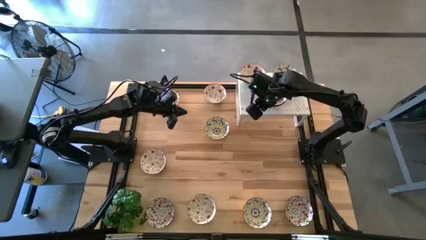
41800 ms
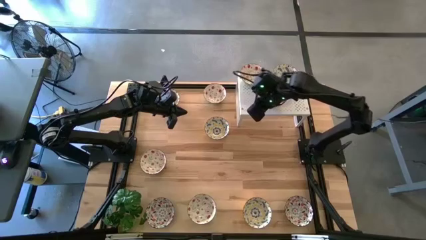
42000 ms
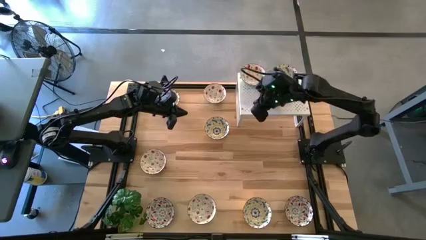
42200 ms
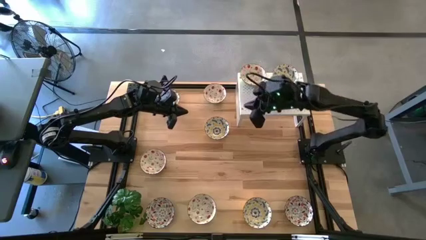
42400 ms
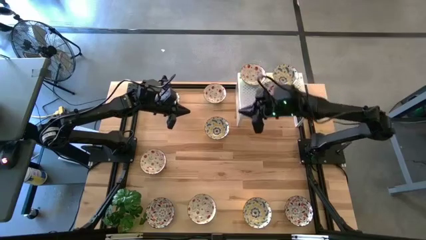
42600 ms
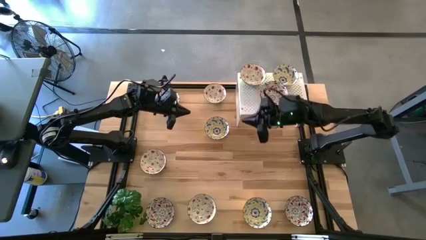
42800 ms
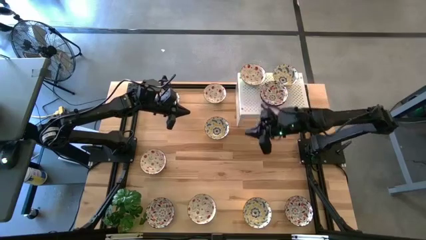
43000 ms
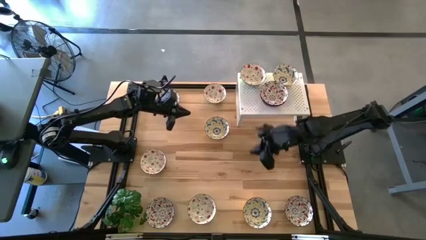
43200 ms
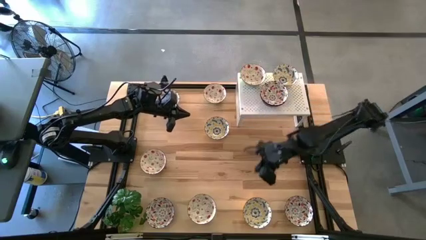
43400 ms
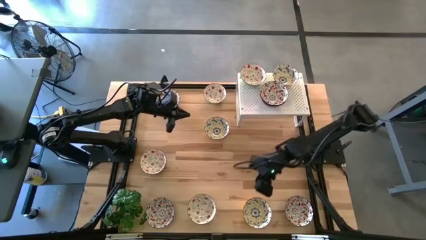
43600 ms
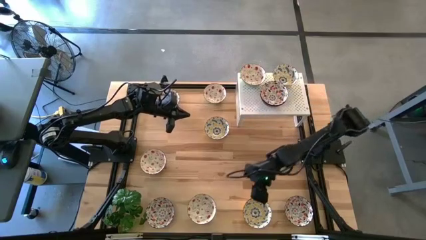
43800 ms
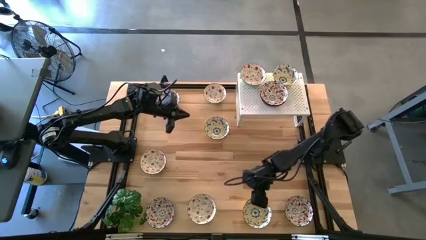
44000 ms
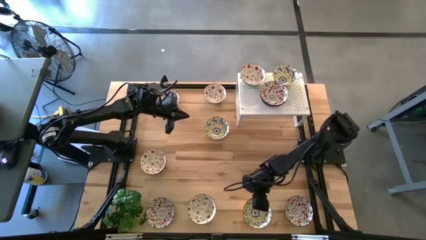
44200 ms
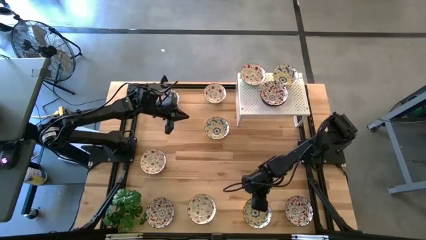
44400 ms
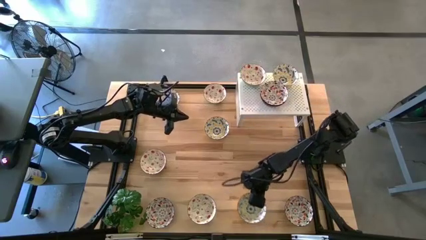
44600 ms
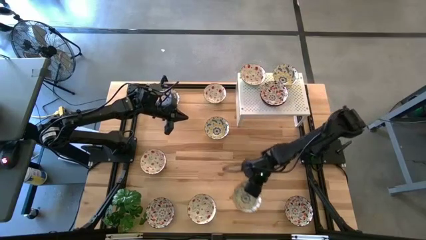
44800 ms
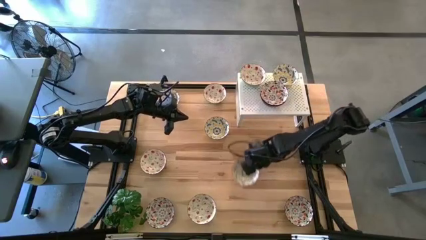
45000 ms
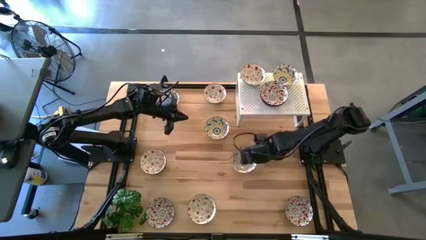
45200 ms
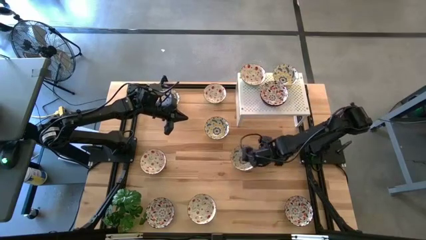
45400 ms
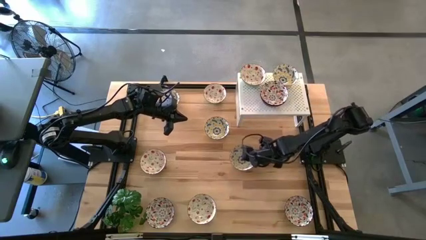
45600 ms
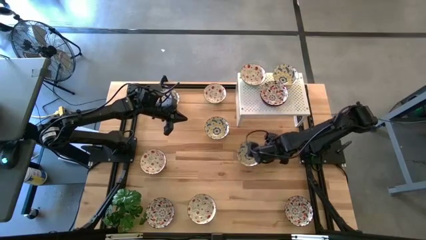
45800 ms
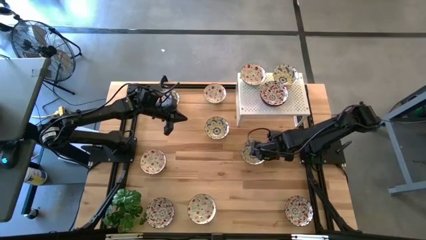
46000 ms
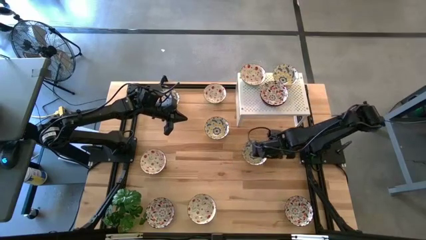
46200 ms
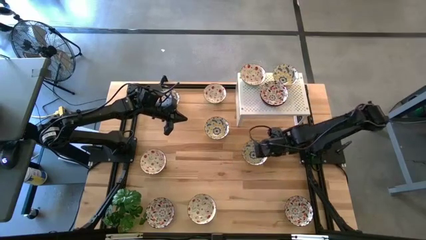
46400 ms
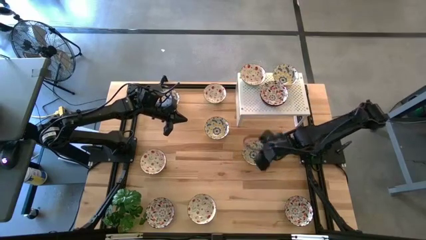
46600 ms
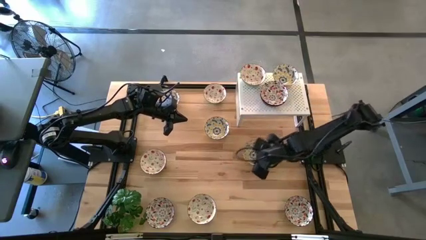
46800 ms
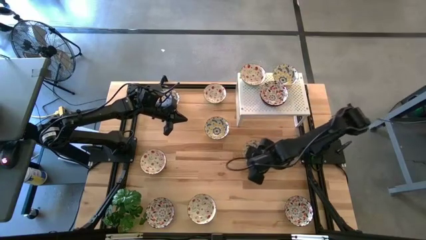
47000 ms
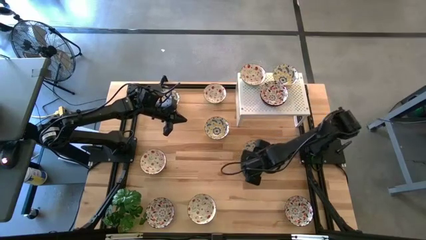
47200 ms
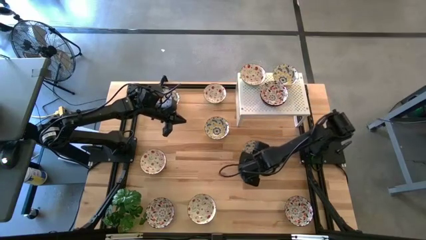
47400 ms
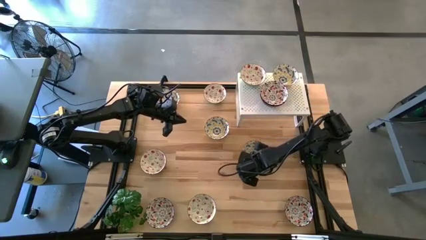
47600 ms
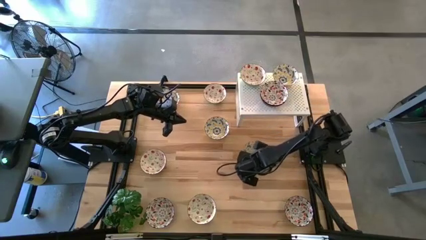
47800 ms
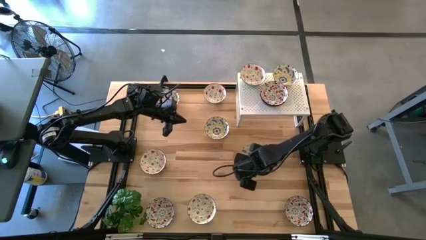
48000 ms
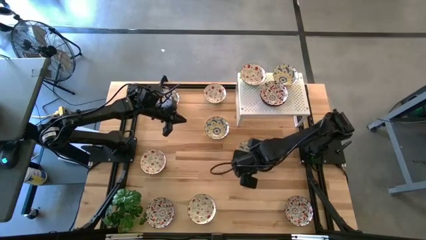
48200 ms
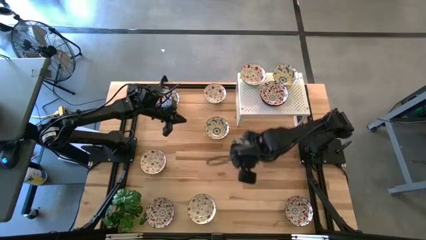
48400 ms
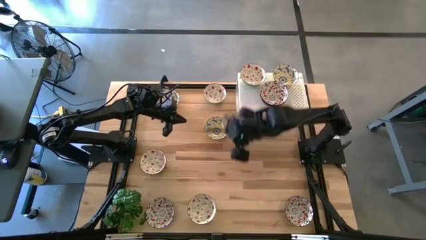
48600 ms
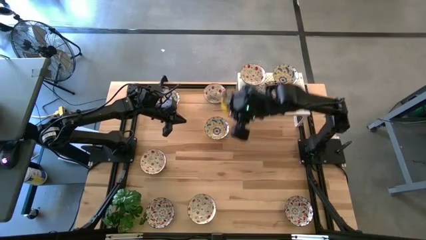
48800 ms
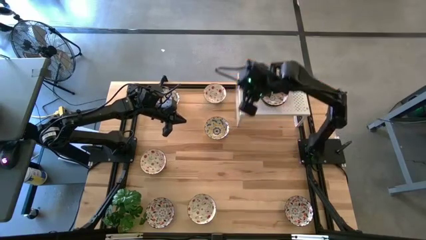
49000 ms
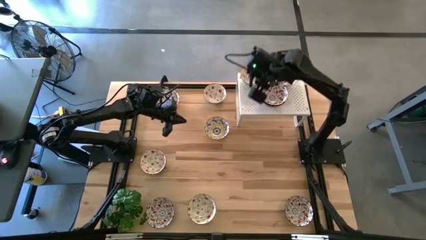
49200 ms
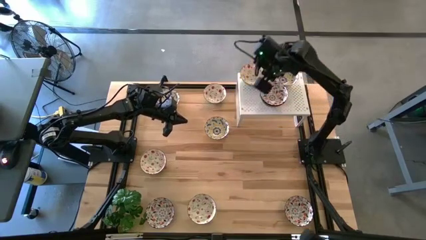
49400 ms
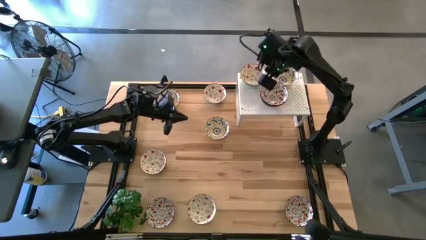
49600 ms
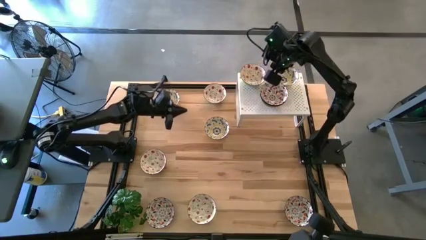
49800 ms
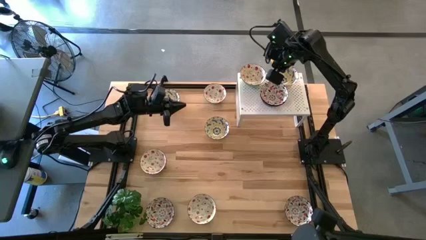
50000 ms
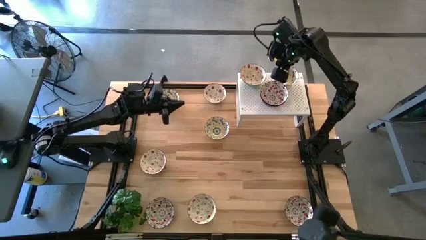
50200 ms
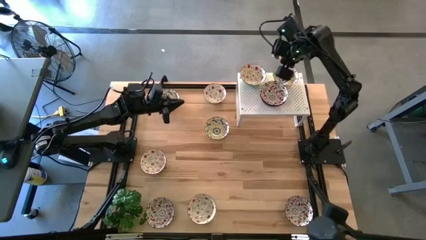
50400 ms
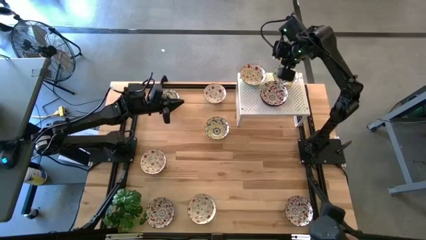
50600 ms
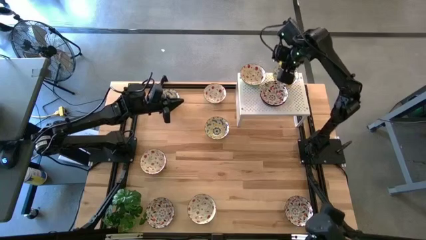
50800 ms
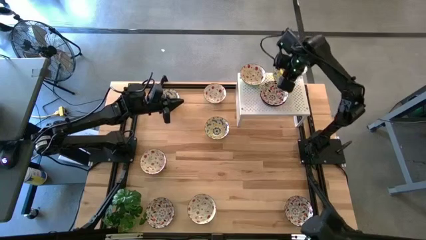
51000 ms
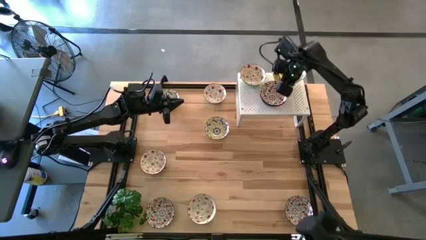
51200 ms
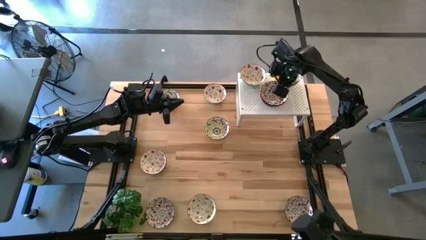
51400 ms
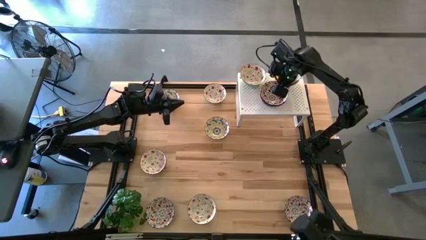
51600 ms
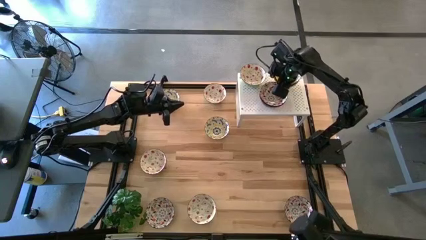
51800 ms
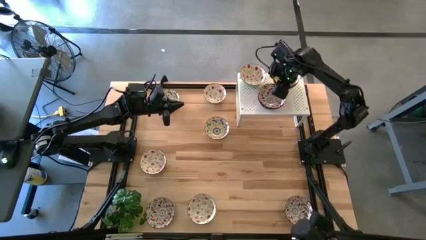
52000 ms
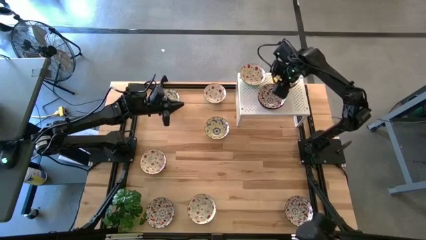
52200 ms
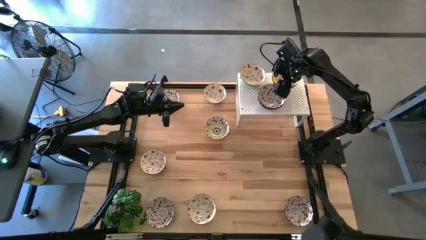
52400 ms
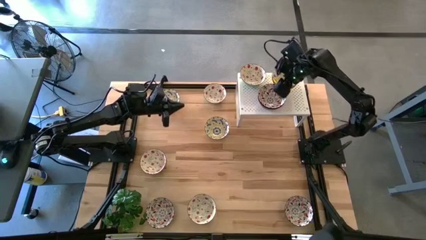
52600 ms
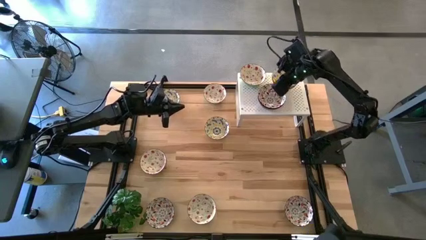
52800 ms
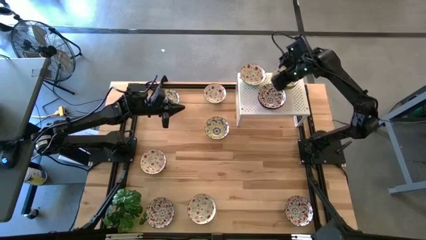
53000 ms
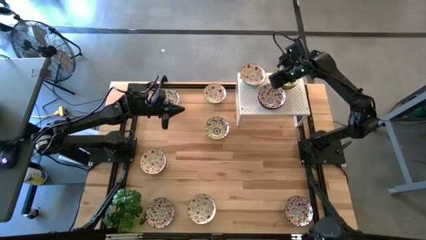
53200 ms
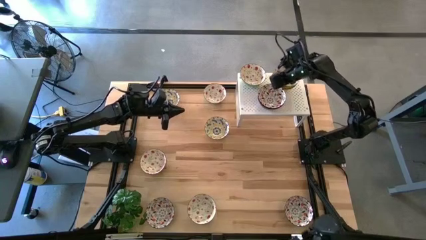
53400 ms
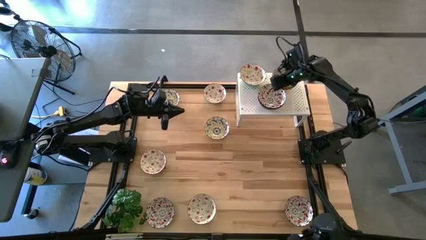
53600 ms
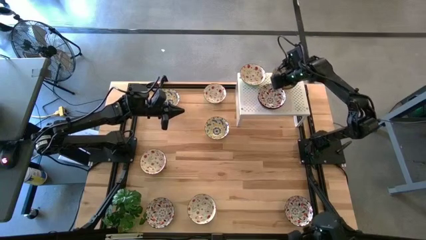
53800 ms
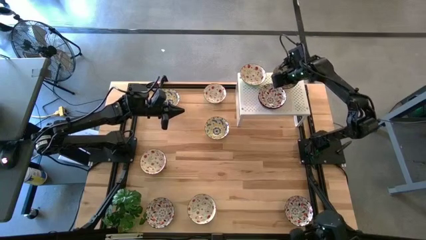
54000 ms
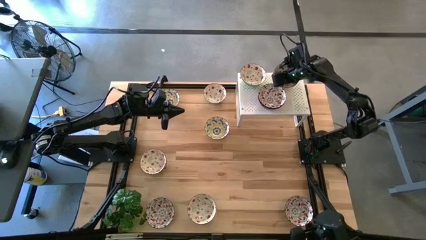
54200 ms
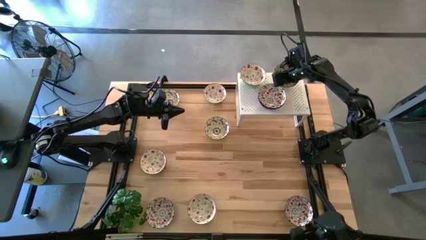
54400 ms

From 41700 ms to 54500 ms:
Task: Pick & Place Mini bowls
Stack the yellow patterned bowl on top of the yellow patterned bowl on the shelf
